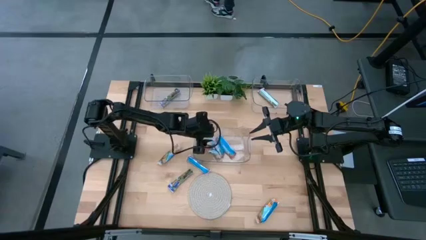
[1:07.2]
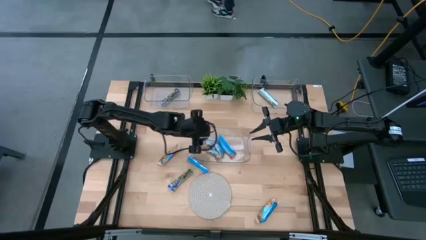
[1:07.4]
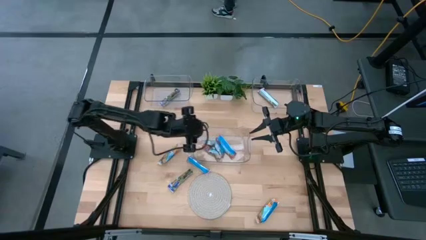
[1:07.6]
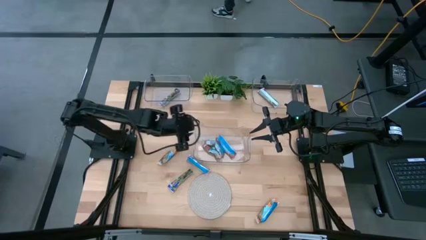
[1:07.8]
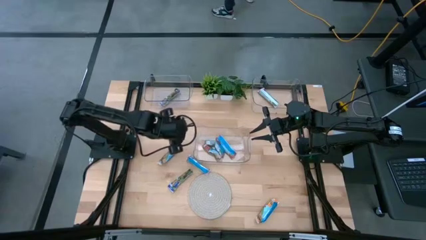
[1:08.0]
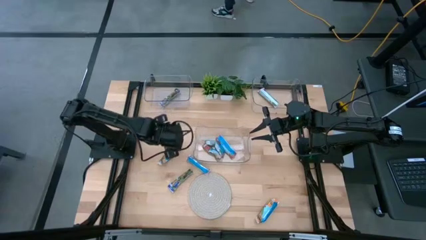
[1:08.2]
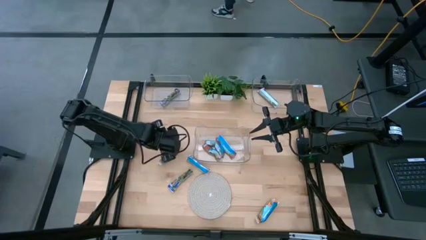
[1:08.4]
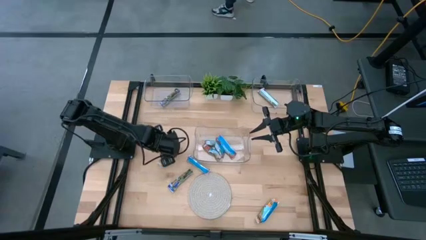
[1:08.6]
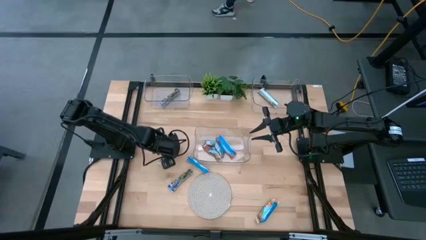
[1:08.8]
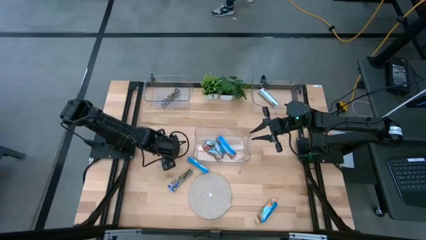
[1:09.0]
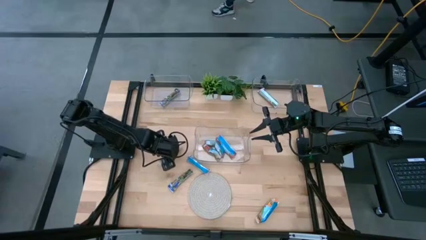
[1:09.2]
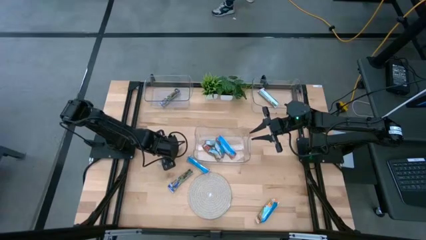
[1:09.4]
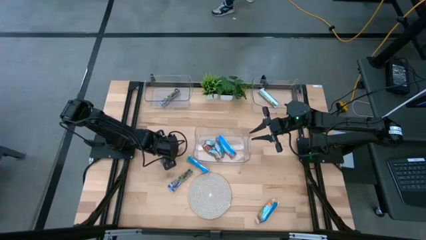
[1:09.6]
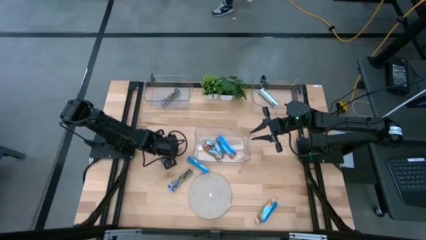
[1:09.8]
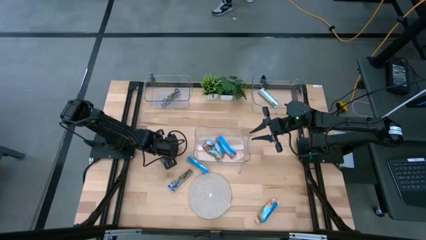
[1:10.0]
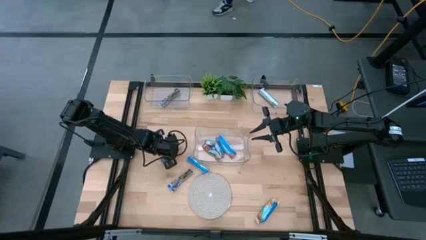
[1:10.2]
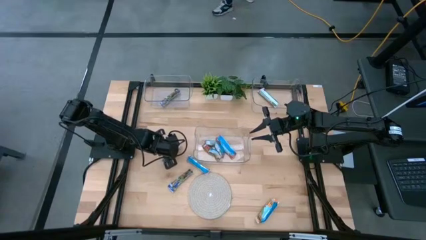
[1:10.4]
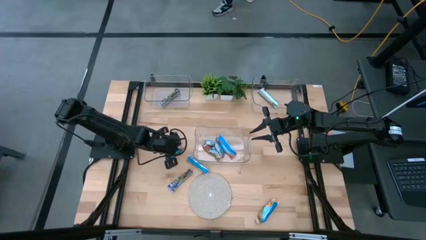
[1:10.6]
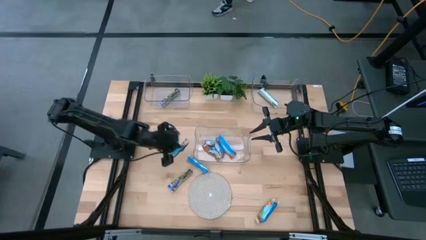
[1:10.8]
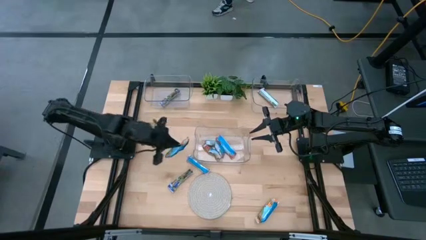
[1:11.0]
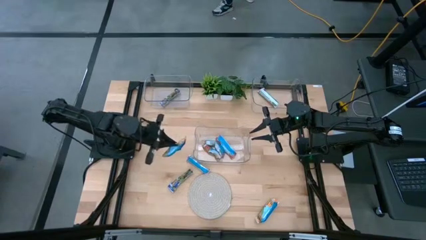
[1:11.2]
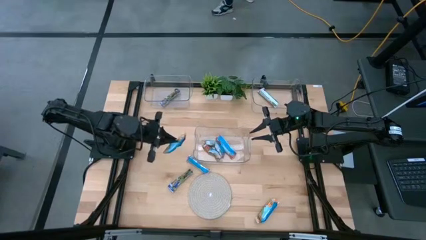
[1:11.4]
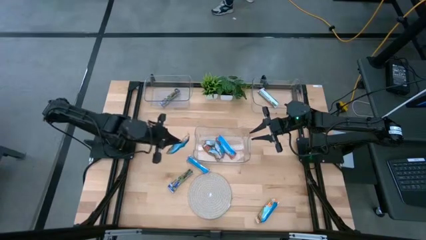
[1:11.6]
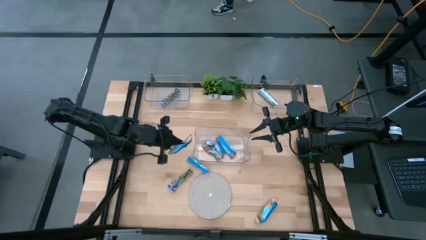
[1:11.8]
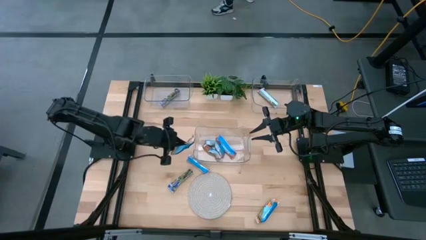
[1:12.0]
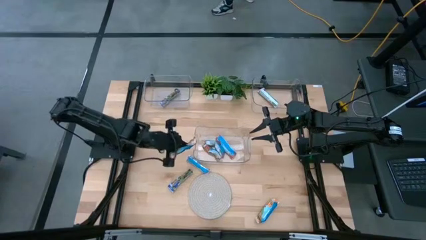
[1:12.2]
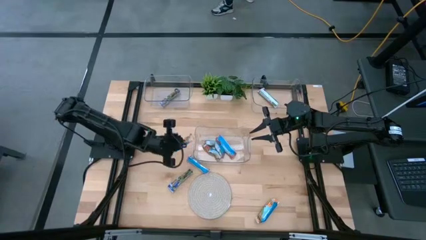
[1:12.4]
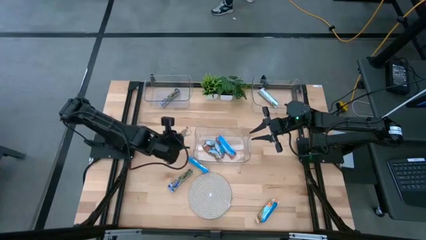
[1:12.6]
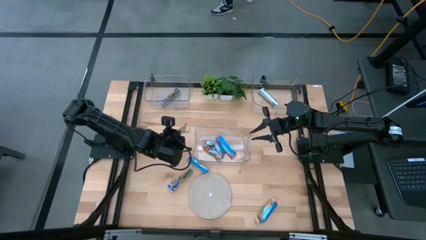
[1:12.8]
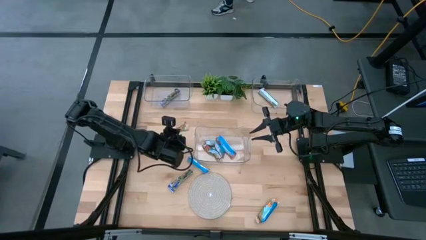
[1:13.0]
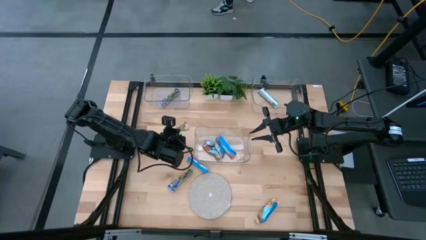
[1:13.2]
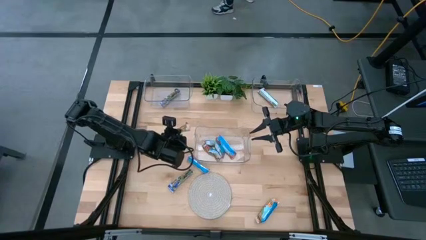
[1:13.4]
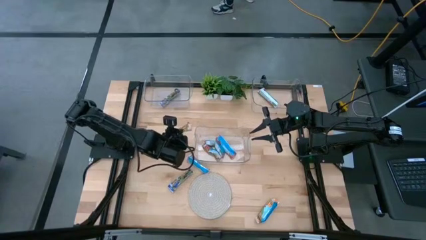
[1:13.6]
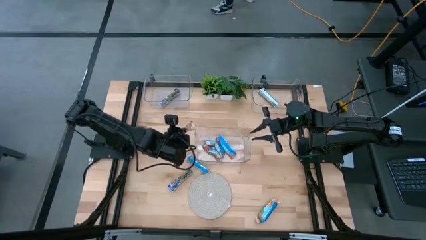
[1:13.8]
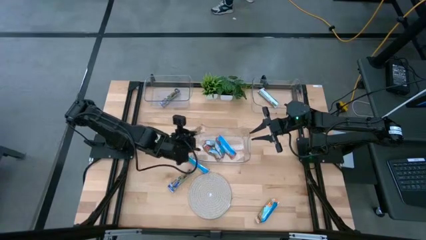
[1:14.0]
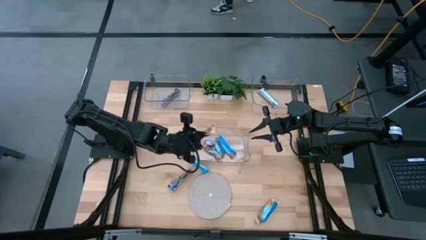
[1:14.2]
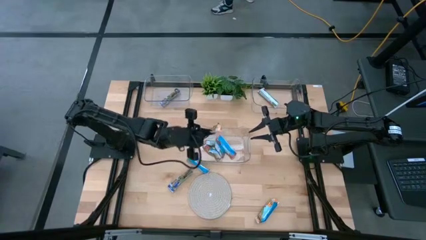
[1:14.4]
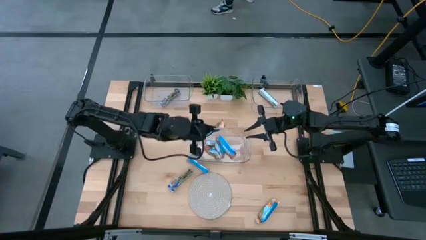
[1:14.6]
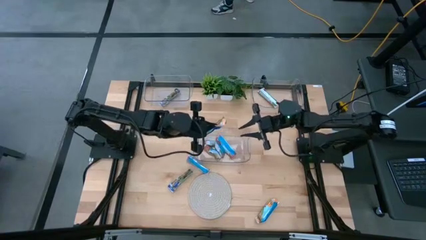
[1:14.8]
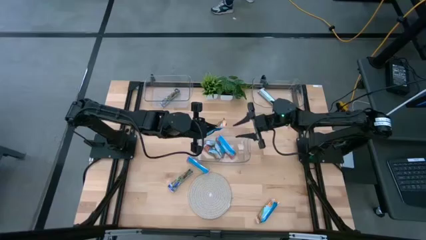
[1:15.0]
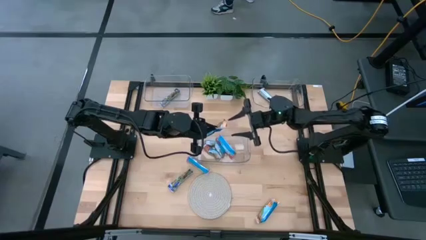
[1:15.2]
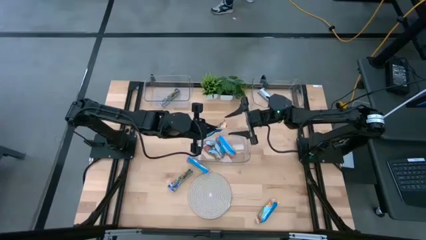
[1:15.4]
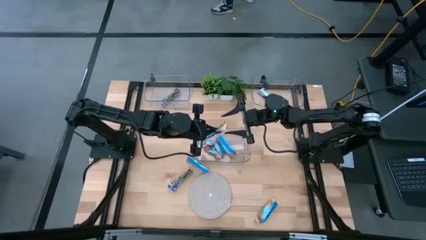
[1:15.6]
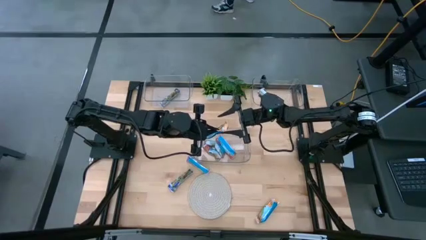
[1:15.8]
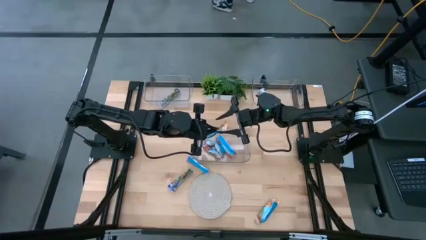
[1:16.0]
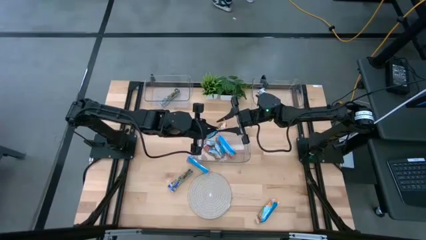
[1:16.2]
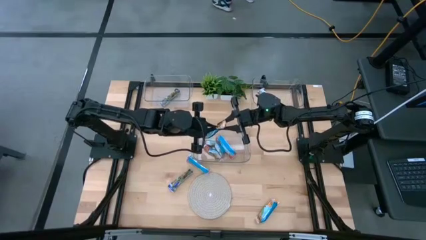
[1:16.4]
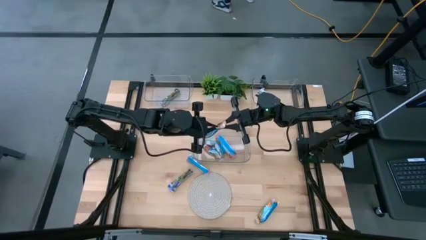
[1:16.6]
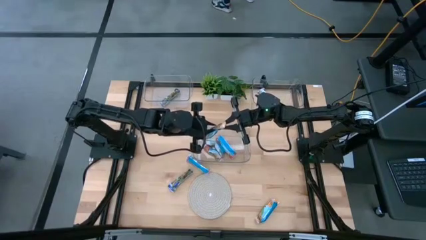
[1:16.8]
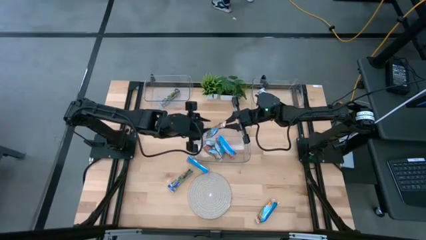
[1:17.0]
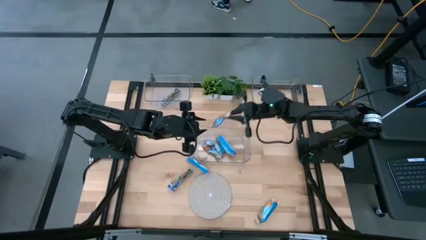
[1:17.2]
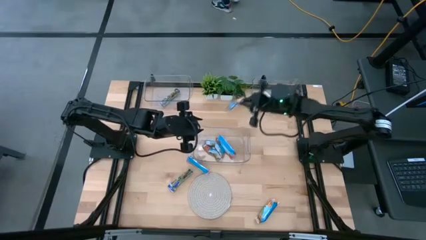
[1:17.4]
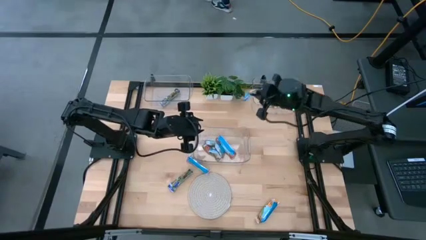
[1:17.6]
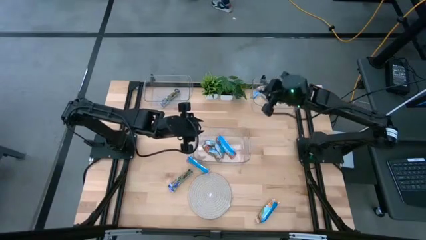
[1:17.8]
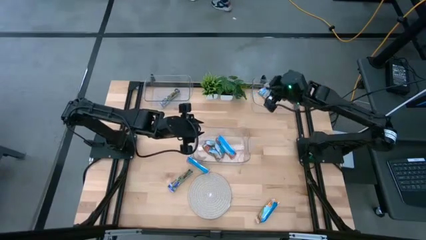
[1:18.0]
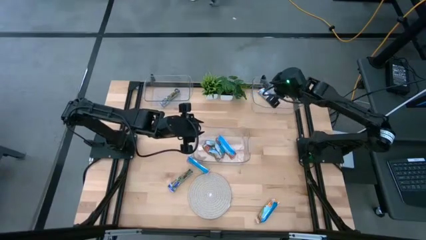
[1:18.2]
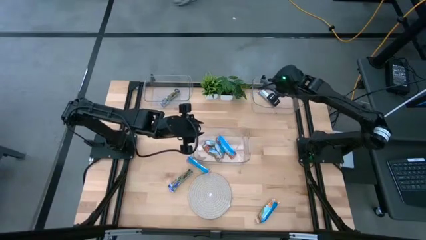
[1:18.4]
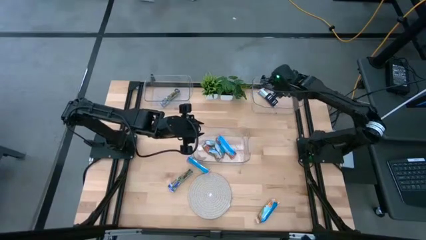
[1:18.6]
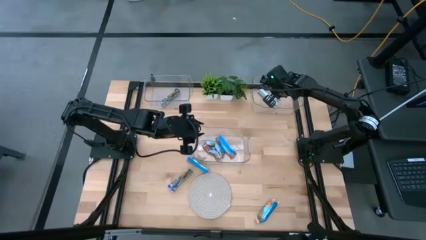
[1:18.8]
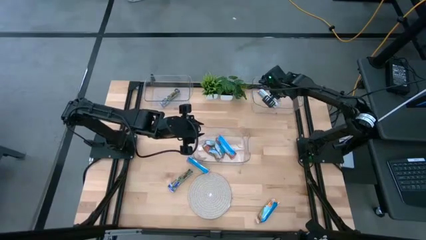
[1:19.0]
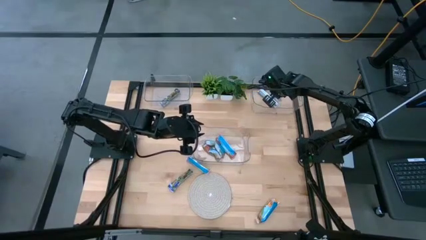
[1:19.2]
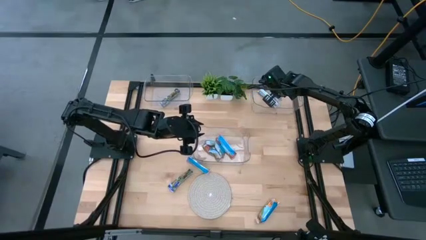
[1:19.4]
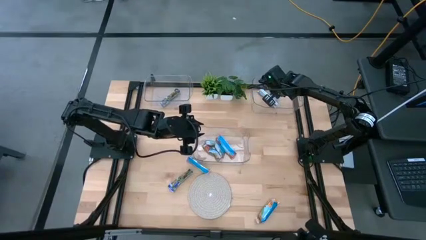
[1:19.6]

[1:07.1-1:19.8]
Task: Pick and place Granola Bars by type
Put the left orange granola bar into the right transparent bin
